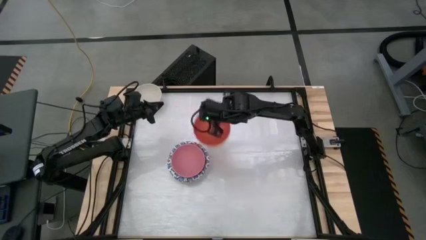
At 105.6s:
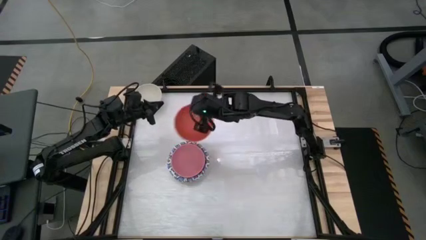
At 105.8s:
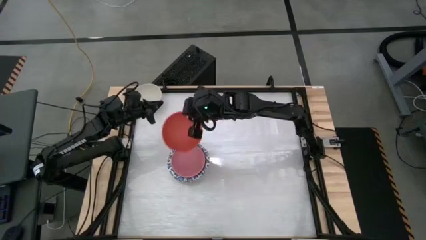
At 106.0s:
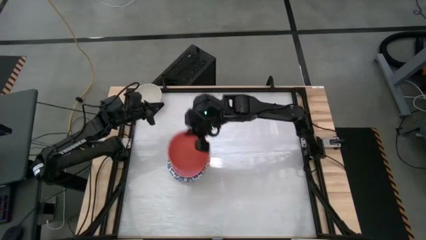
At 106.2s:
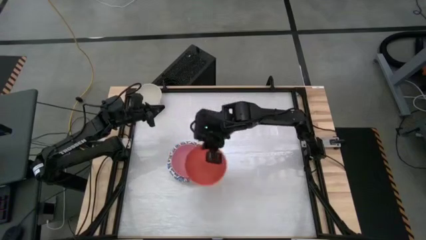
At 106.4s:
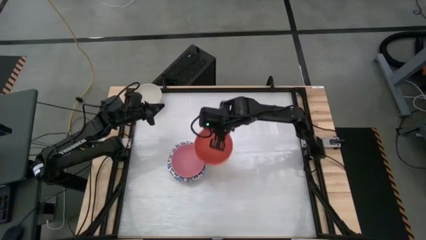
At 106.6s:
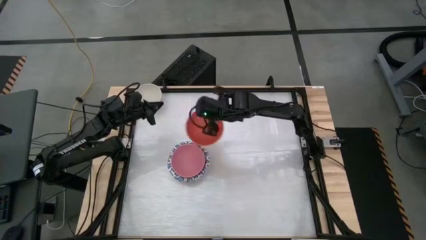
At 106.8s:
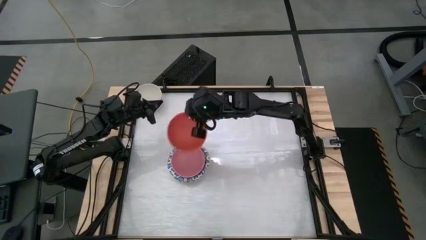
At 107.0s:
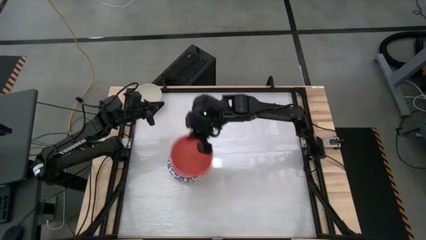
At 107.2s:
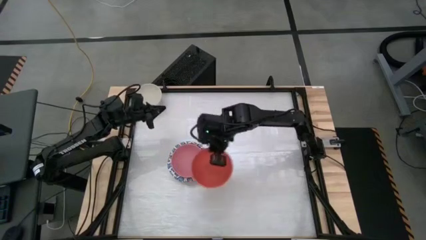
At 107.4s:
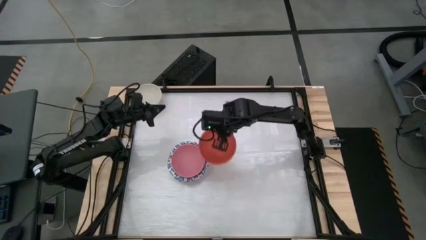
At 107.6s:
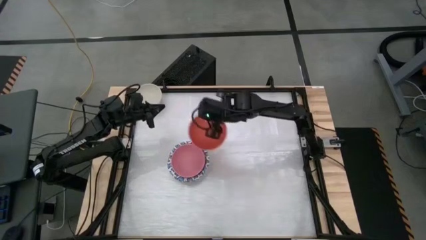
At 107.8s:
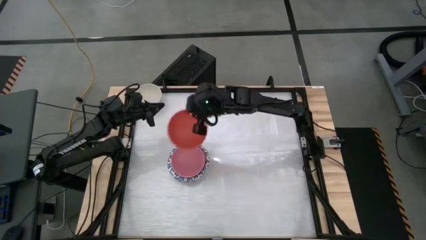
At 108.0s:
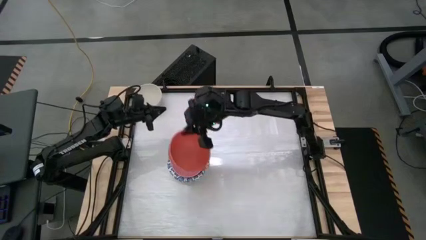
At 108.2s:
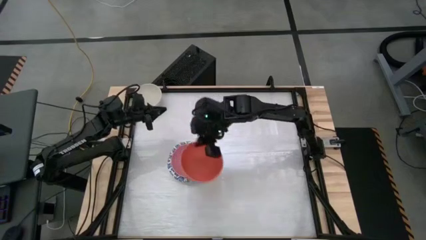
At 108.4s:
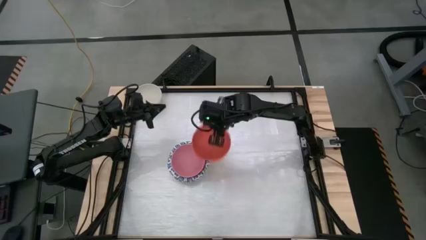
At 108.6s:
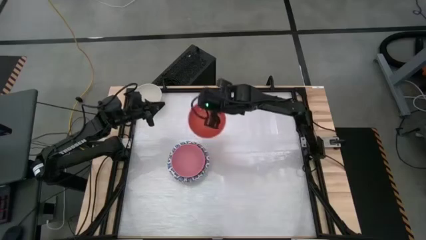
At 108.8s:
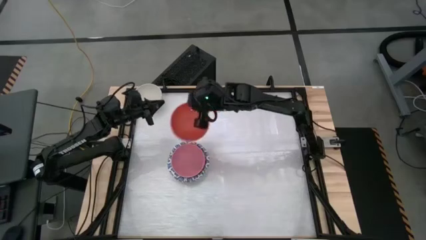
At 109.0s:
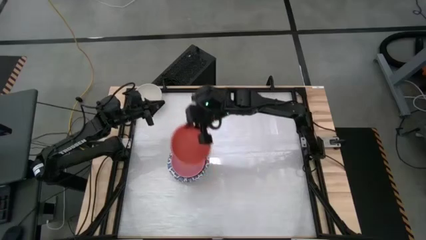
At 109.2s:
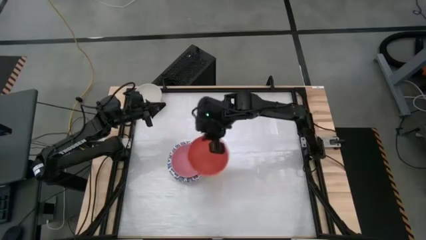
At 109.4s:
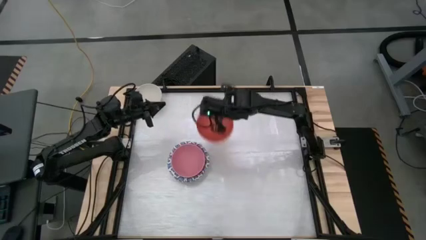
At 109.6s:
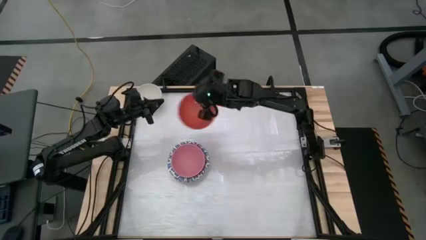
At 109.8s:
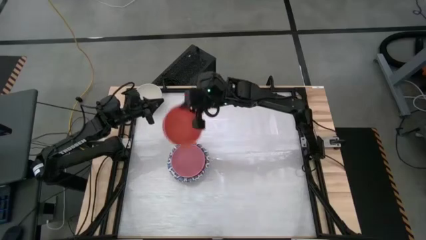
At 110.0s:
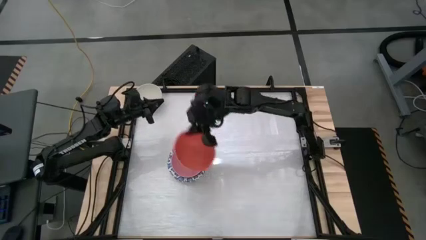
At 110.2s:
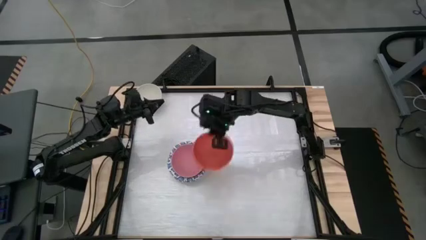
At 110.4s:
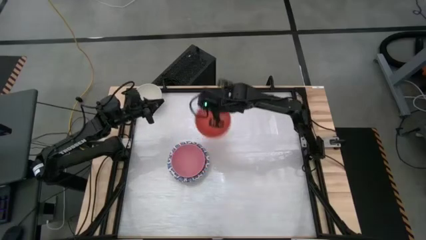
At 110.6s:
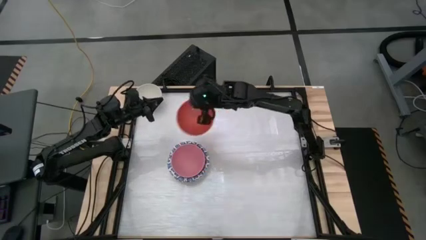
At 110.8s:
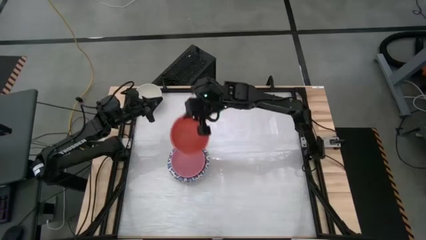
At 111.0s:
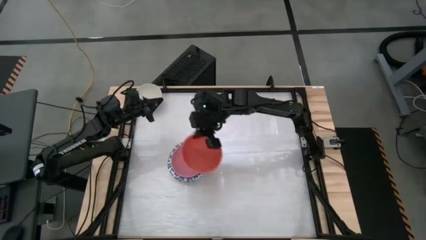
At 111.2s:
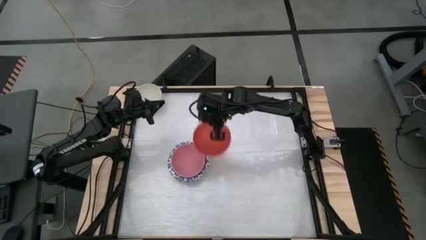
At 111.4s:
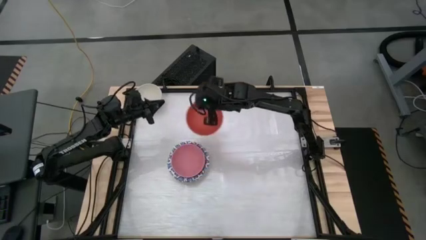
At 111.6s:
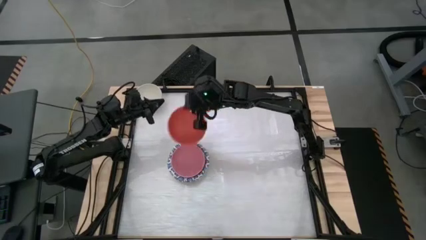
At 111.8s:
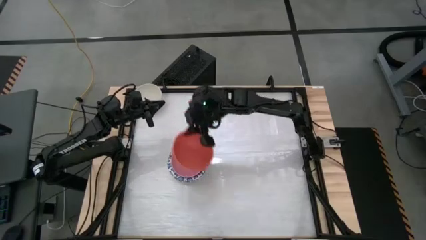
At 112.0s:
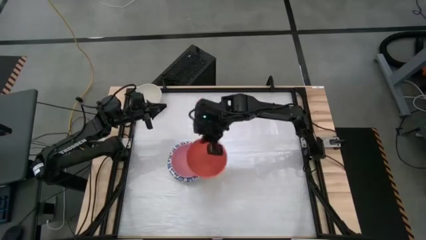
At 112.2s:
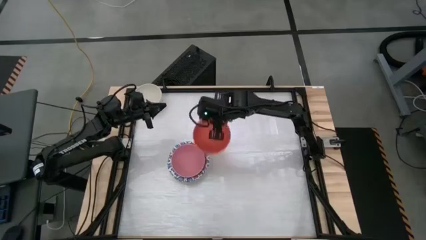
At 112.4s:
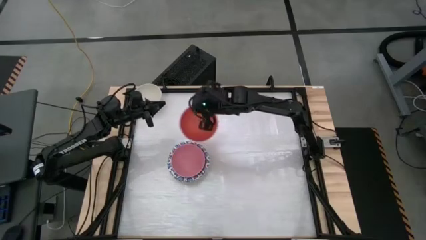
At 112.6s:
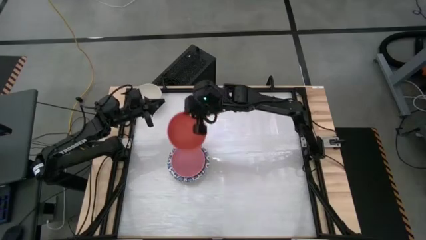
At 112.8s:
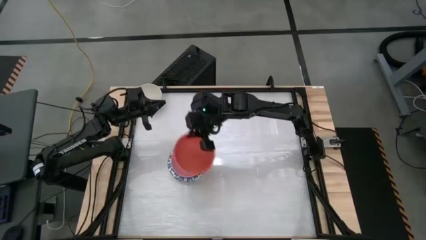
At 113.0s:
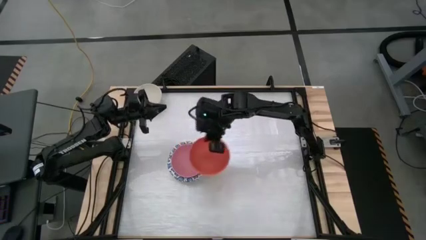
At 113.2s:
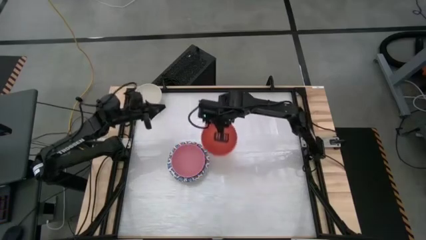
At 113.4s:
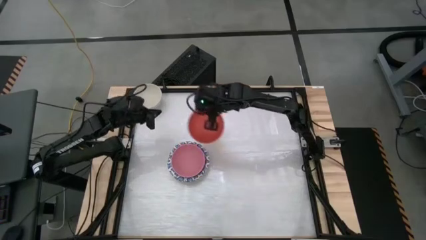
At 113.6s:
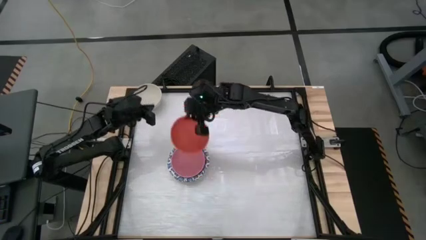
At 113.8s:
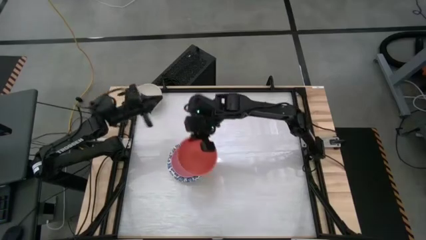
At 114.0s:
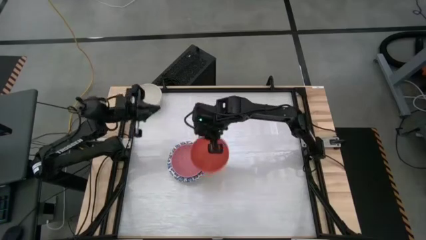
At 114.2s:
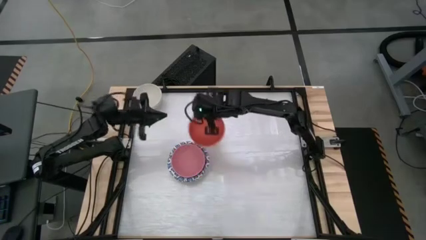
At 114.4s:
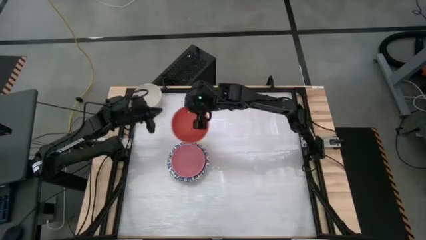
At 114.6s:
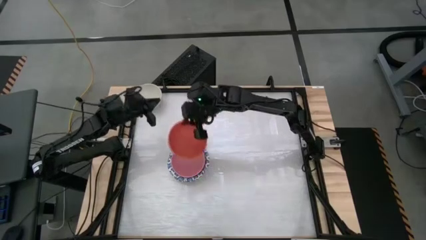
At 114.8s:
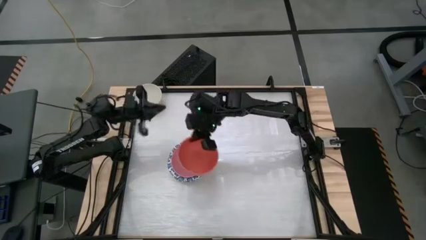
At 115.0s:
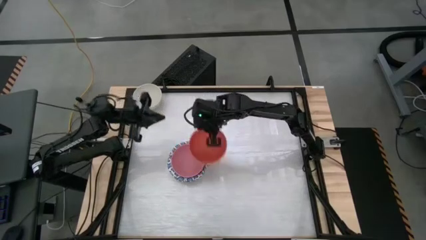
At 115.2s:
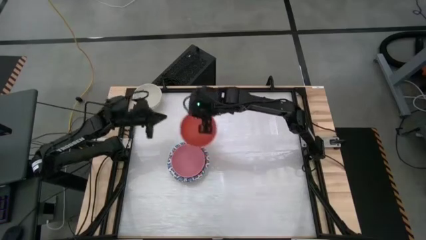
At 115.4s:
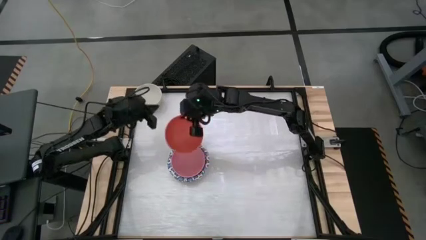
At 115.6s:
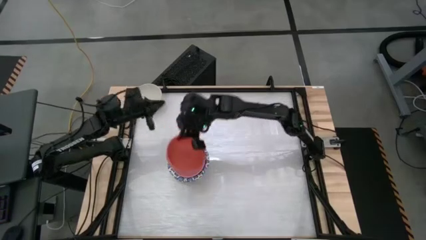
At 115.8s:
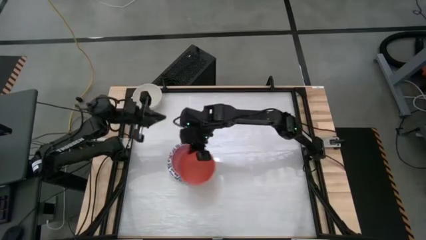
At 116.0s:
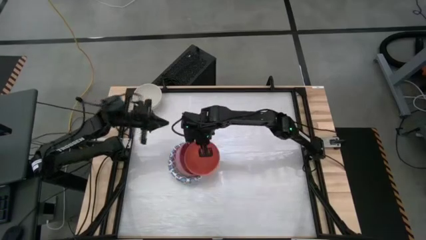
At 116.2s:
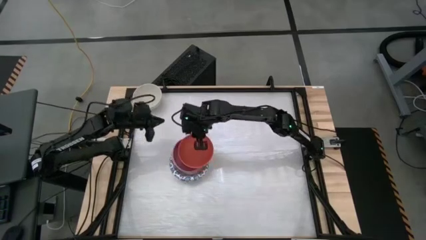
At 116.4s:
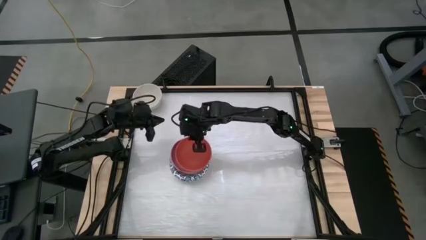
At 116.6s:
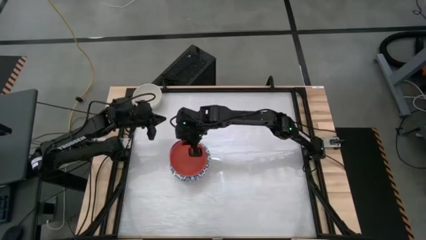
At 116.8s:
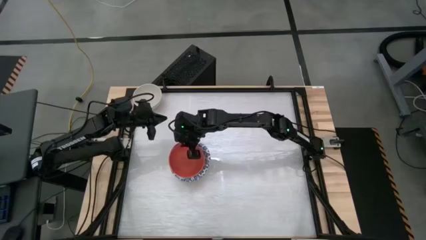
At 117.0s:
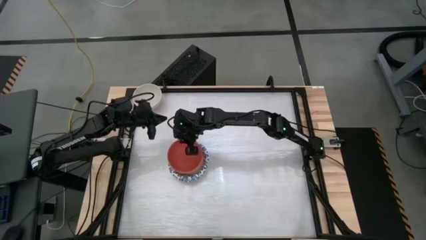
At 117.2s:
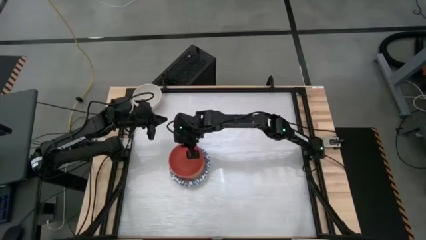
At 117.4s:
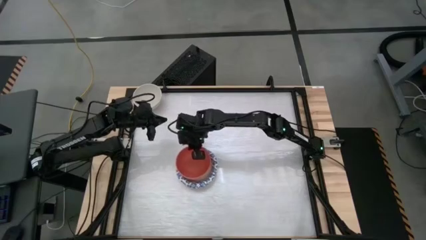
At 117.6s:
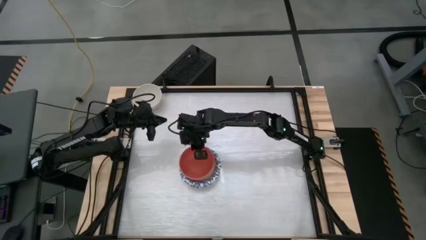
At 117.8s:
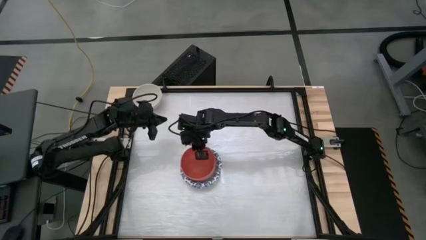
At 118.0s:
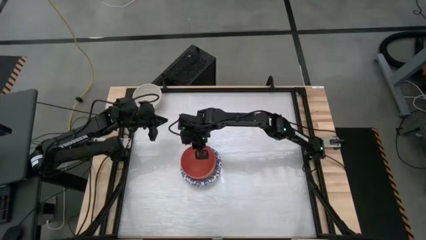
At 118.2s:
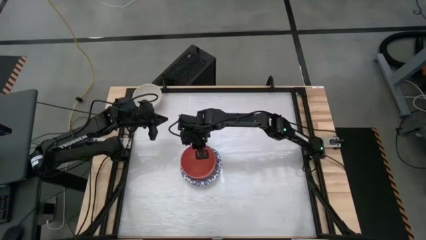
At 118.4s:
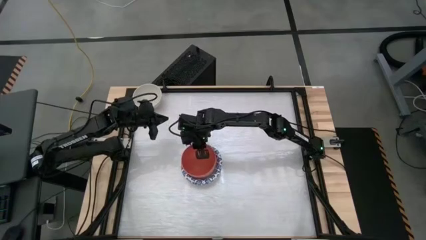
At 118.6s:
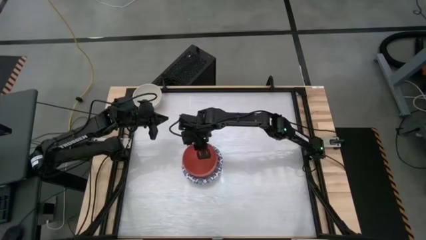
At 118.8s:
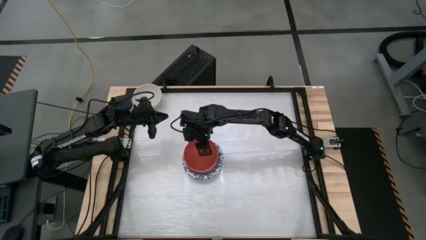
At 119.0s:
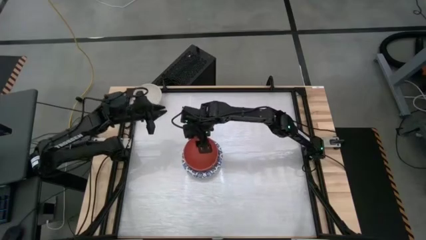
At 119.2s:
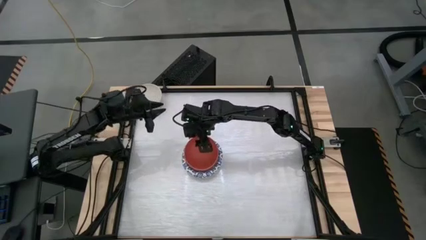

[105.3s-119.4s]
Task: Nest bowls inside each other by size order
Stack the orange bowl on top of the pink bowl

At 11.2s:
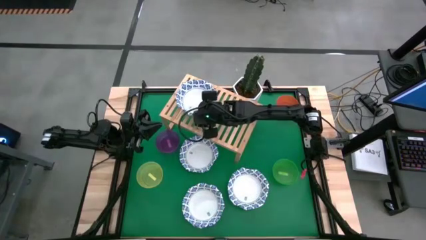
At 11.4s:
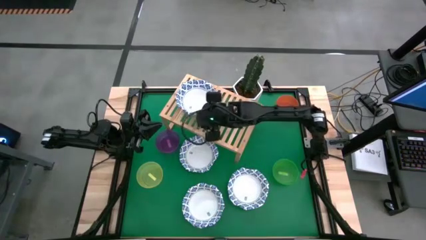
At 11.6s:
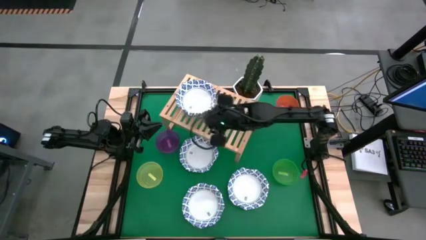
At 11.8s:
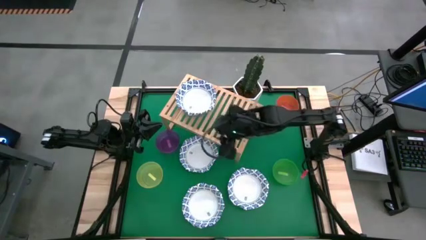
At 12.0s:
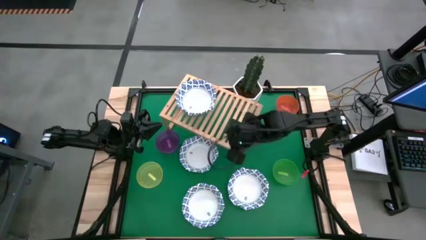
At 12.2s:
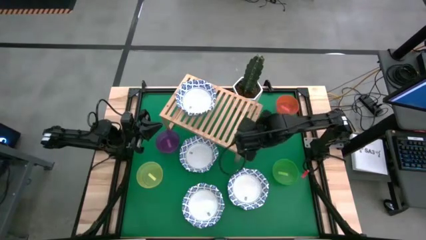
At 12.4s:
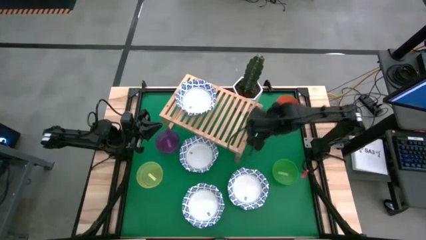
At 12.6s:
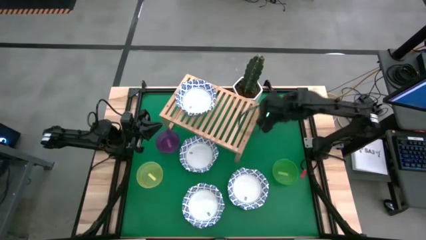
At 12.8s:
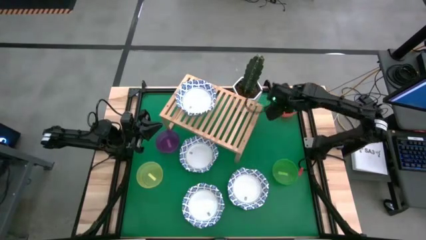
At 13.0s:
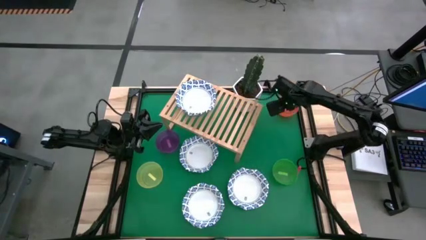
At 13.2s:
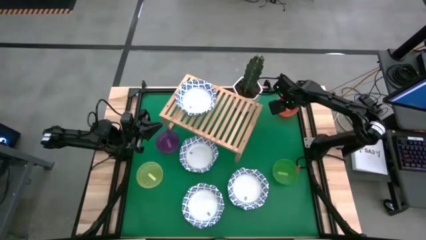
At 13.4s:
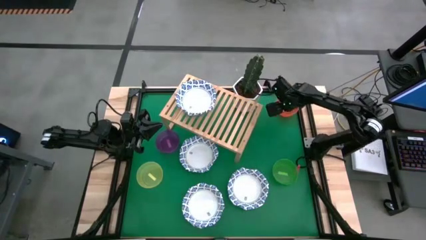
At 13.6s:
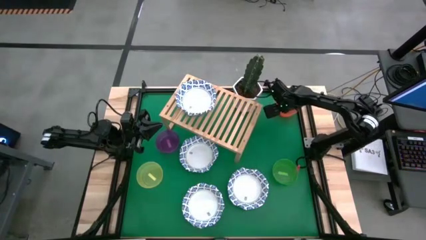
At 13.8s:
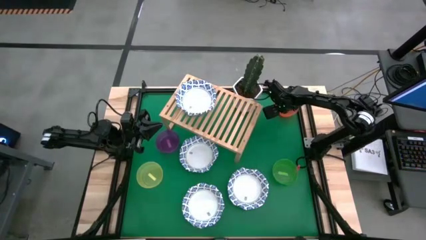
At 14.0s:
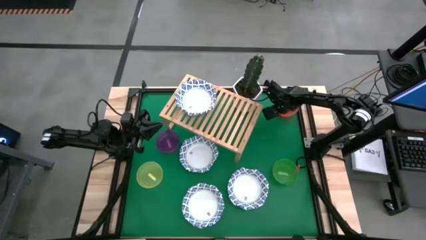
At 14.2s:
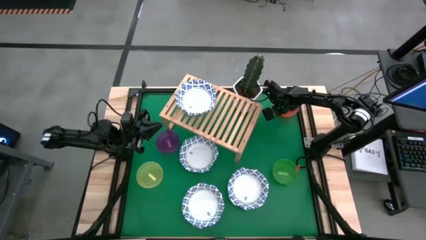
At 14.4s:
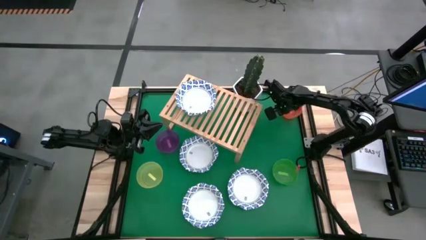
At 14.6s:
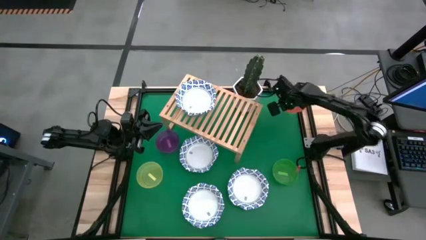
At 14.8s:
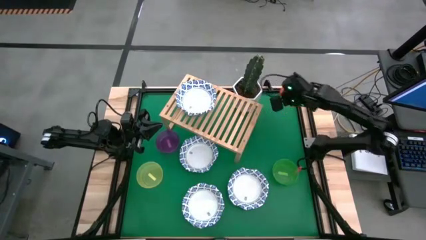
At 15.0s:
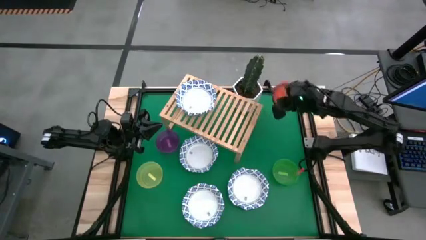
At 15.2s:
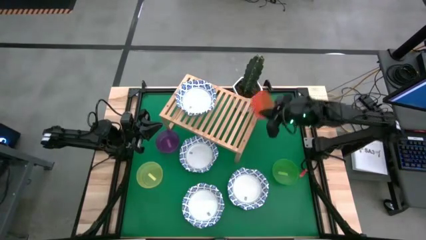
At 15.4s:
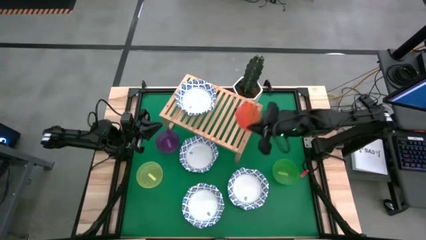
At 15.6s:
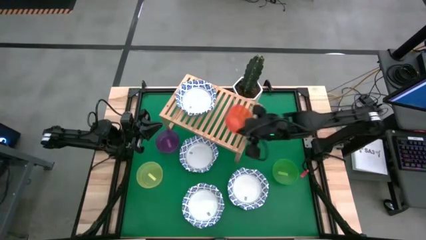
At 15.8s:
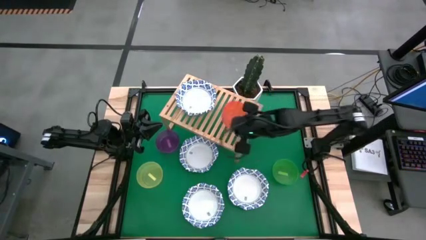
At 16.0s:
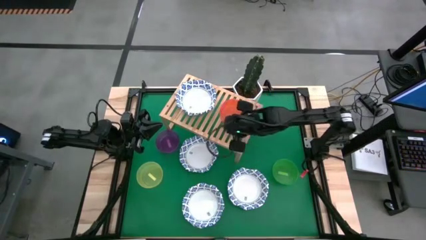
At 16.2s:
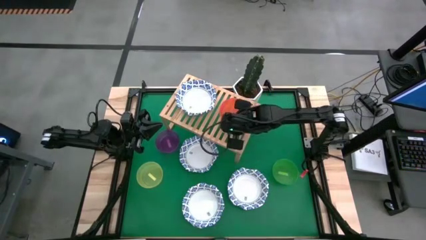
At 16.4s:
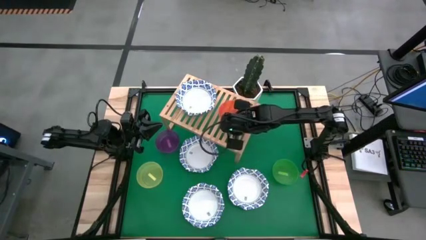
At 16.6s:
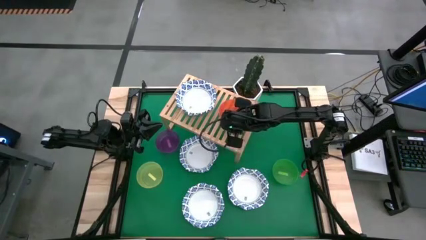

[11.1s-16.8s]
Task: Place and stack bowls onto a shelf
Put the orange bowl on the shelf
